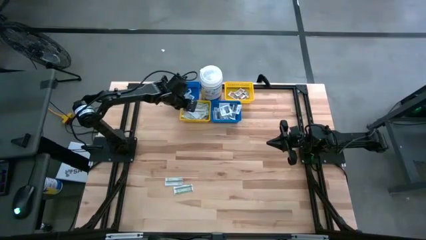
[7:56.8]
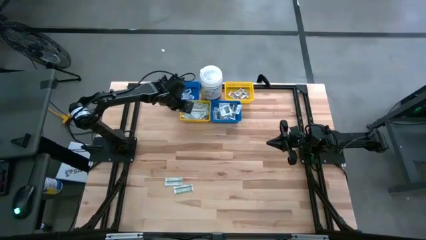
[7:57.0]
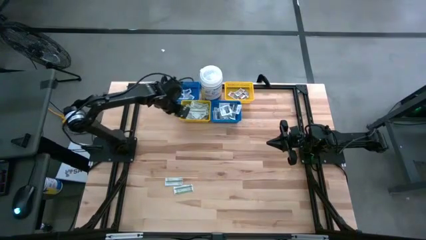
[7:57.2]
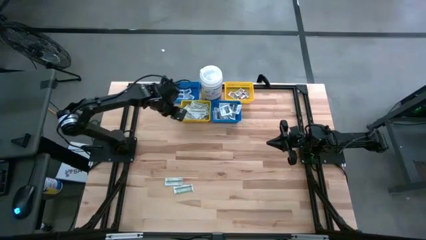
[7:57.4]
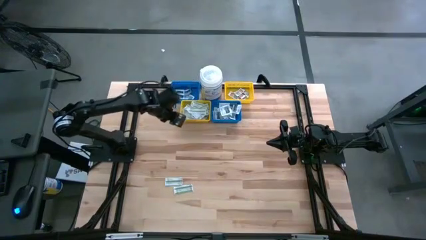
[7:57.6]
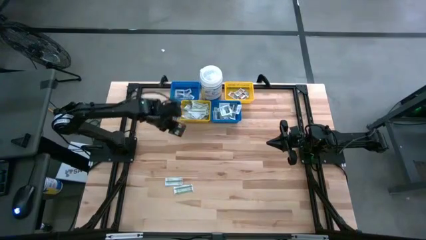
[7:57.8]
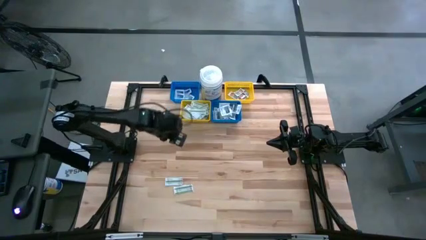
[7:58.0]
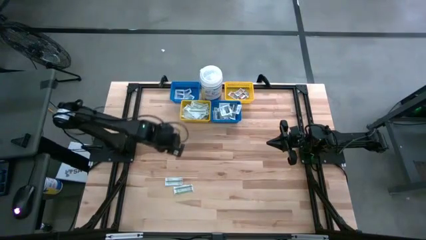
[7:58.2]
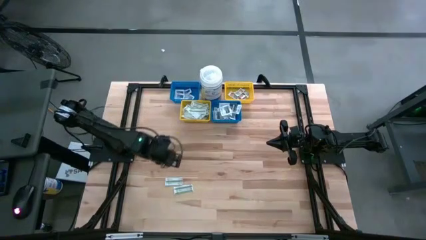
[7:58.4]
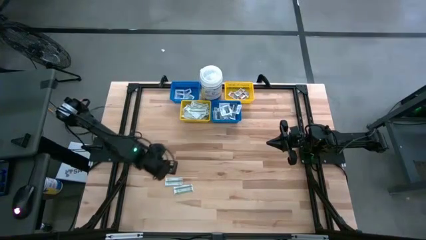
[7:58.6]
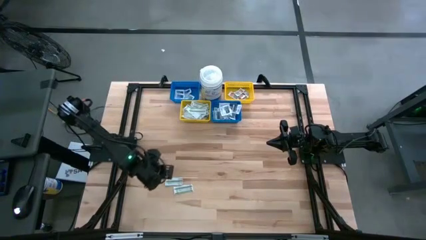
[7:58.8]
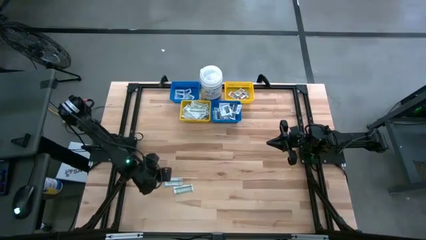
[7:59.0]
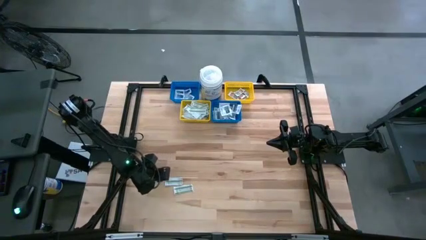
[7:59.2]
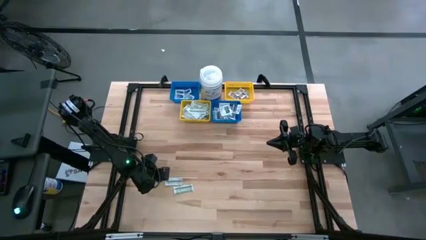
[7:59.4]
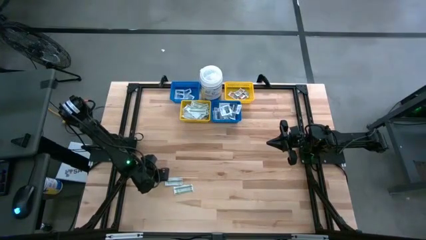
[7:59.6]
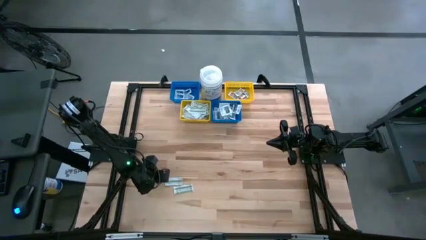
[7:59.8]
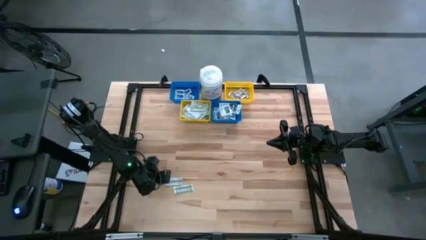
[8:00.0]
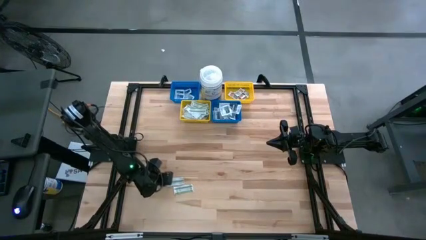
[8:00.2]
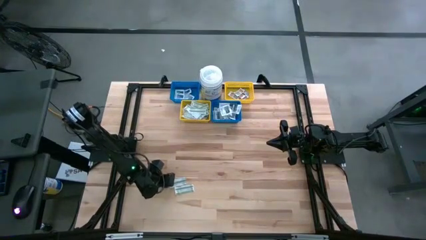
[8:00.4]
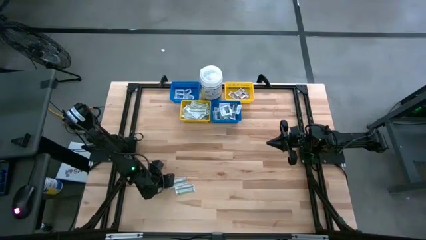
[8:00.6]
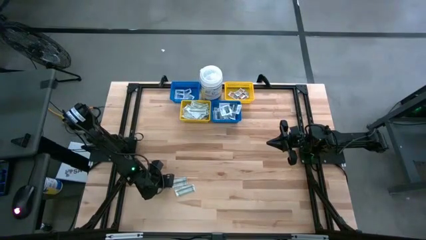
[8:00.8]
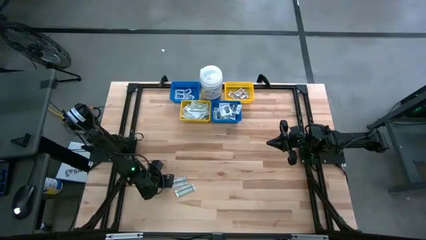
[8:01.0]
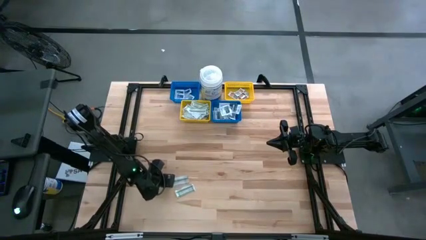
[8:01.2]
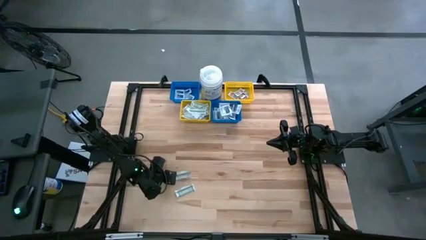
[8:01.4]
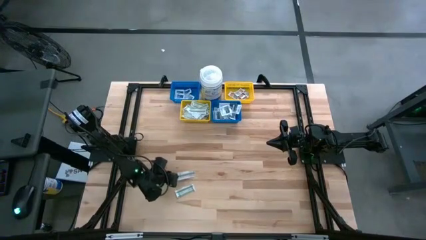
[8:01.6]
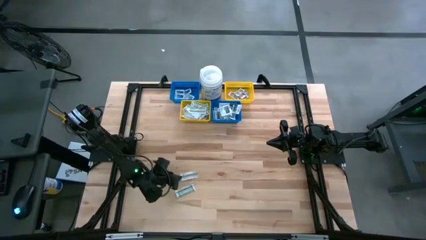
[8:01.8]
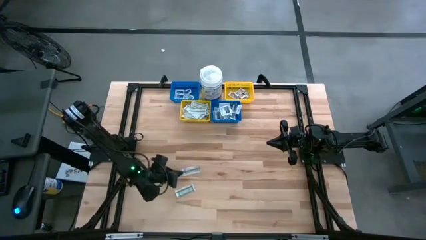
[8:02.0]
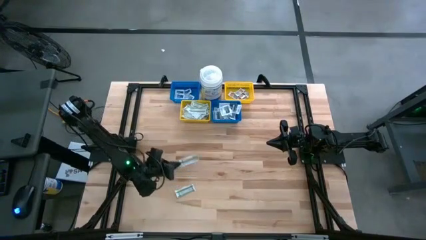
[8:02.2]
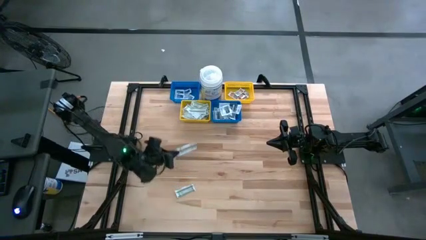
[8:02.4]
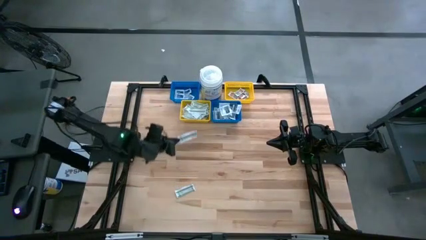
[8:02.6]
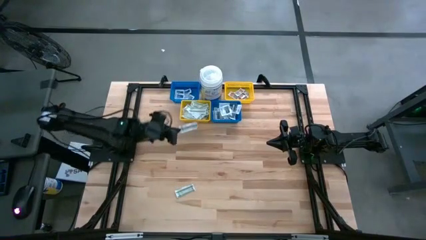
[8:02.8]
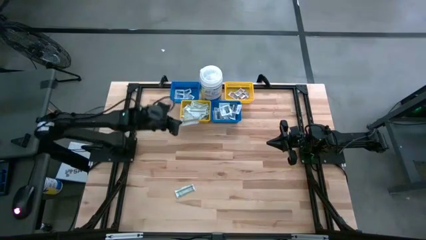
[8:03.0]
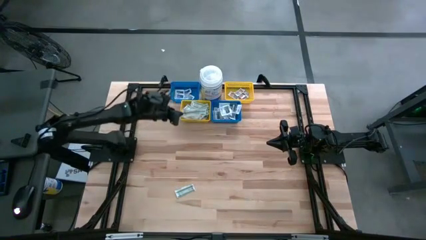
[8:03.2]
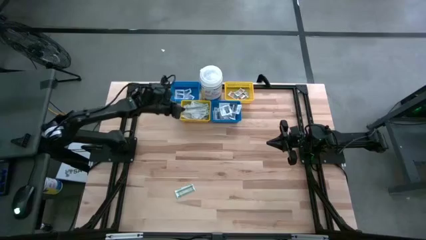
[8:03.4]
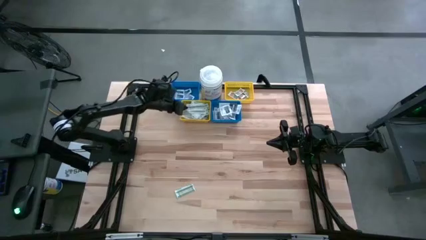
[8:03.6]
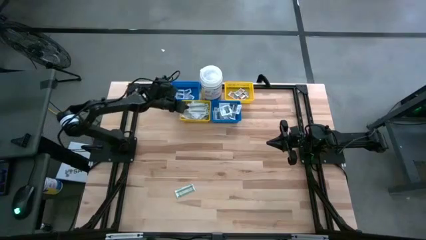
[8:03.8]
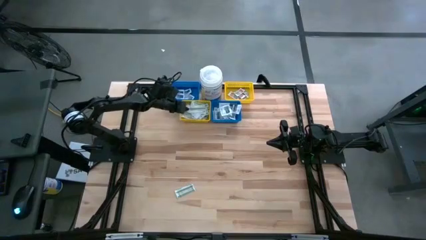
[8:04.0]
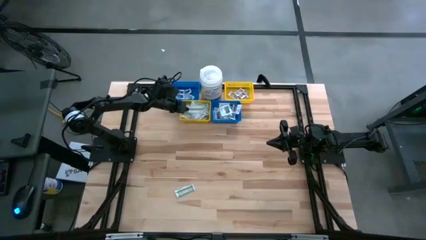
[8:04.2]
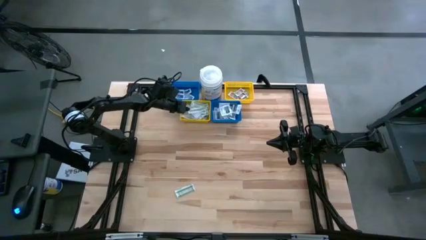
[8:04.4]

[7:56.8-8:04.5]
Task: Pick & Place First Aid Supplies
Put the green bandage pad into the left yellow bin

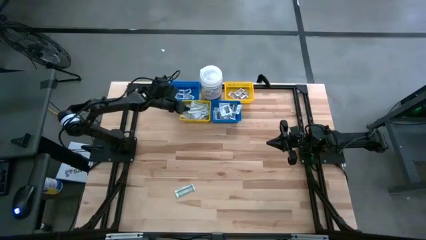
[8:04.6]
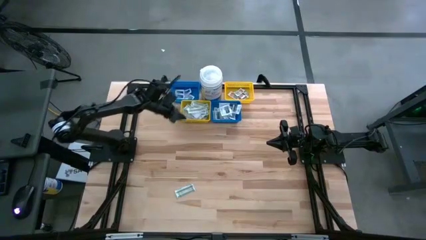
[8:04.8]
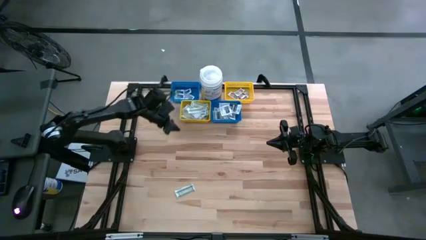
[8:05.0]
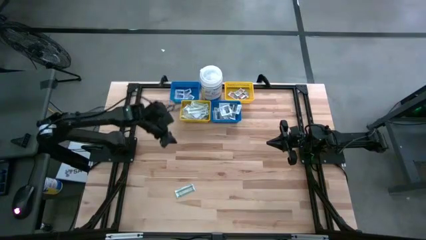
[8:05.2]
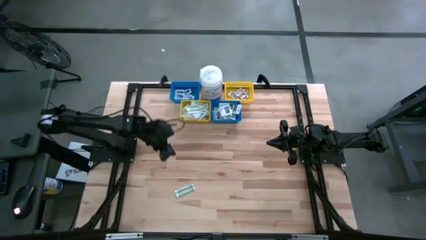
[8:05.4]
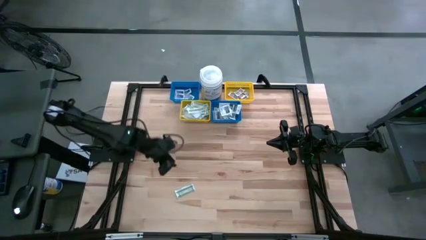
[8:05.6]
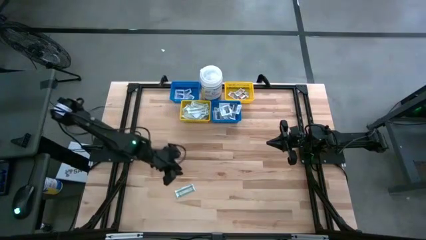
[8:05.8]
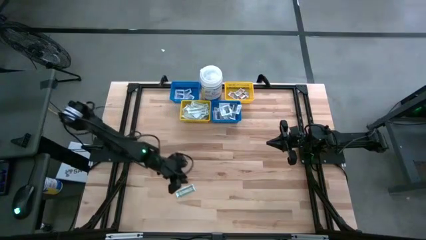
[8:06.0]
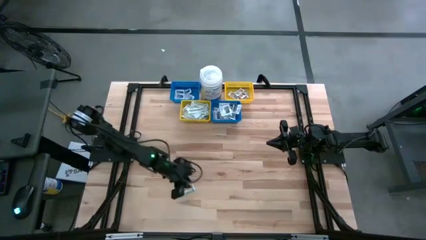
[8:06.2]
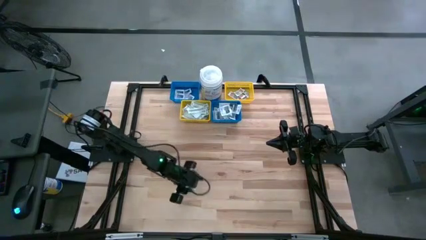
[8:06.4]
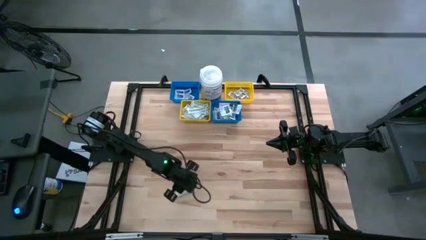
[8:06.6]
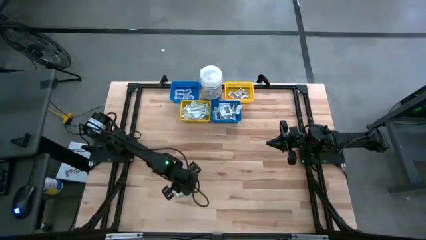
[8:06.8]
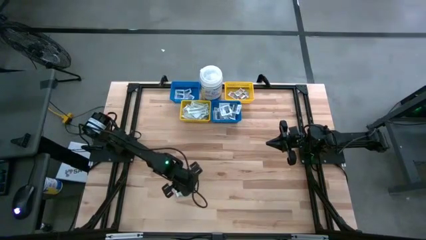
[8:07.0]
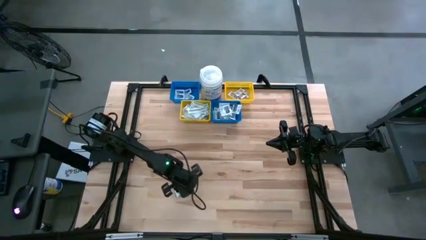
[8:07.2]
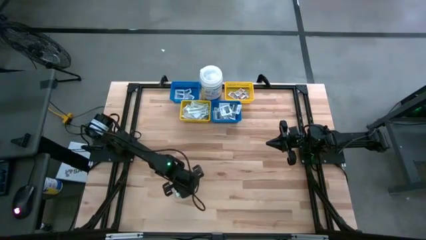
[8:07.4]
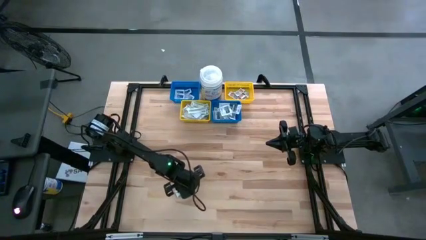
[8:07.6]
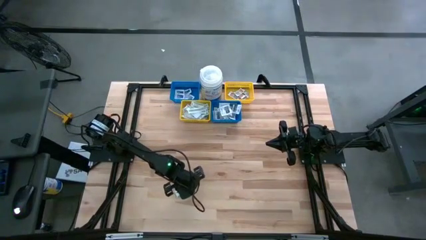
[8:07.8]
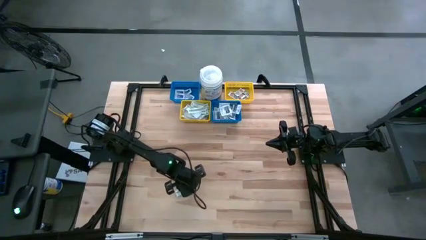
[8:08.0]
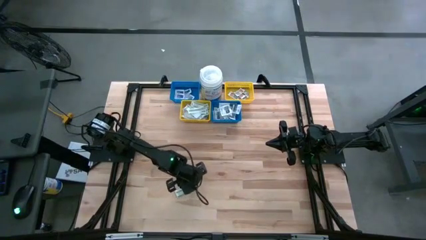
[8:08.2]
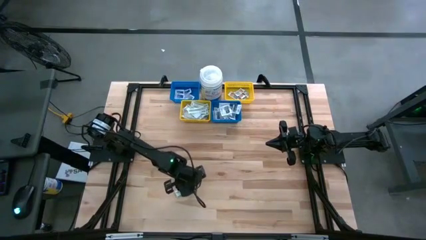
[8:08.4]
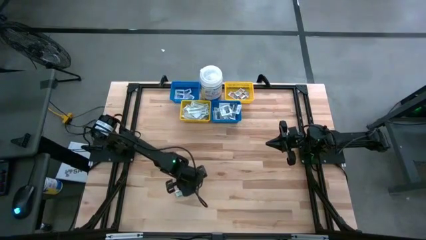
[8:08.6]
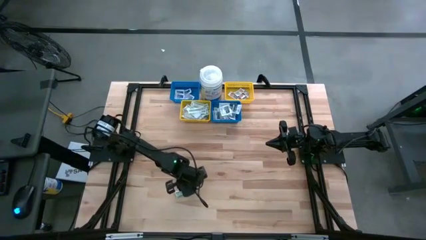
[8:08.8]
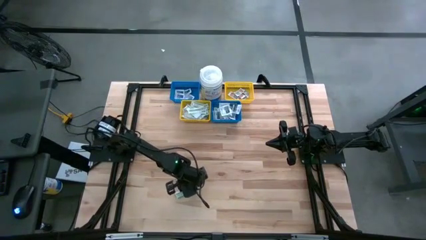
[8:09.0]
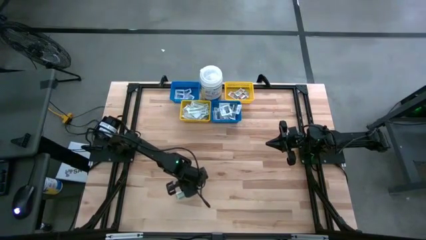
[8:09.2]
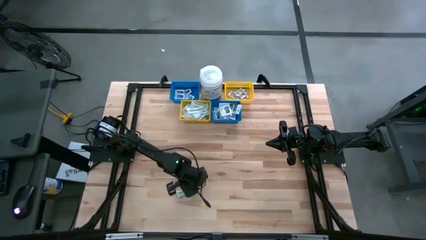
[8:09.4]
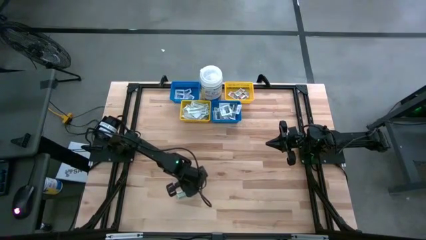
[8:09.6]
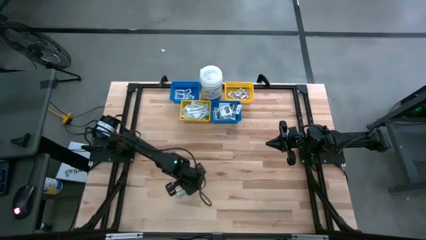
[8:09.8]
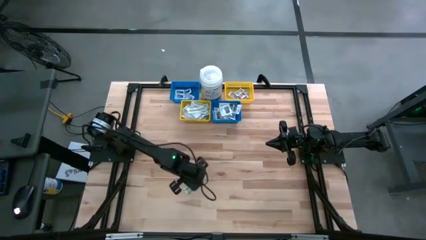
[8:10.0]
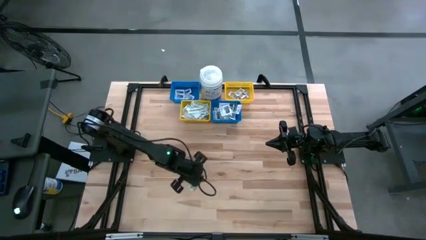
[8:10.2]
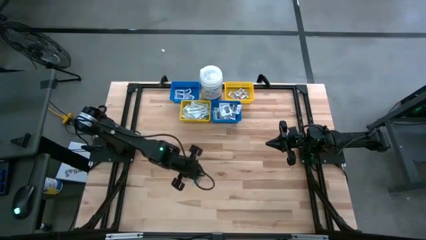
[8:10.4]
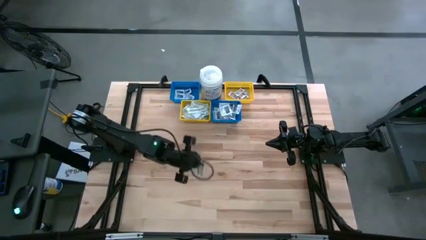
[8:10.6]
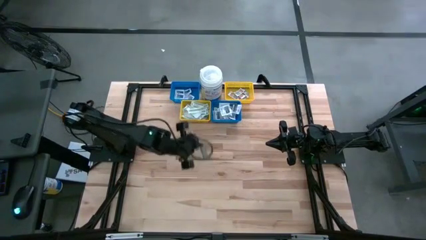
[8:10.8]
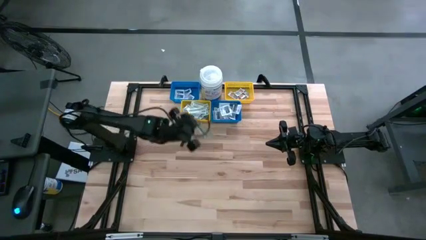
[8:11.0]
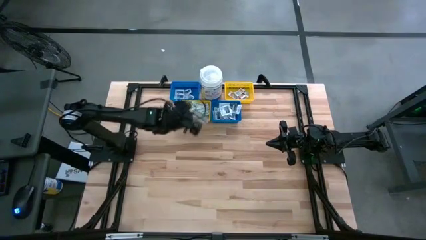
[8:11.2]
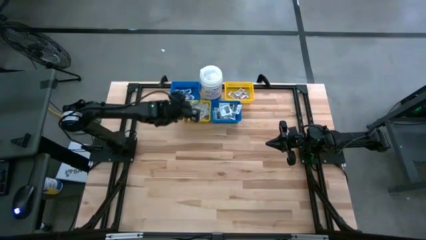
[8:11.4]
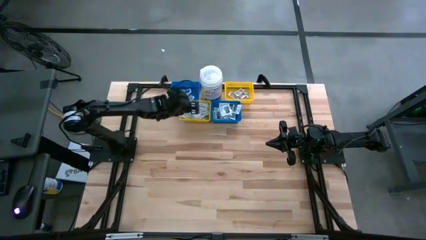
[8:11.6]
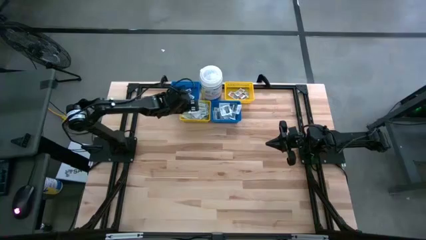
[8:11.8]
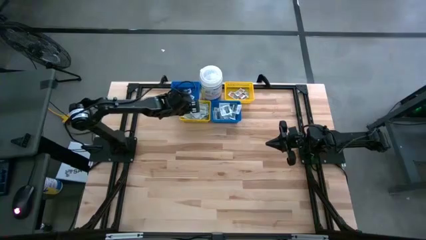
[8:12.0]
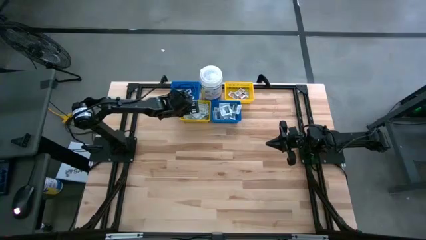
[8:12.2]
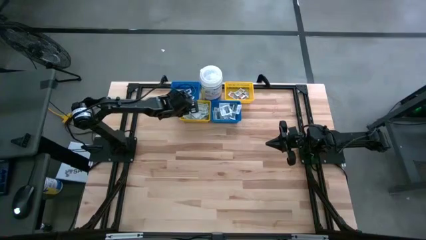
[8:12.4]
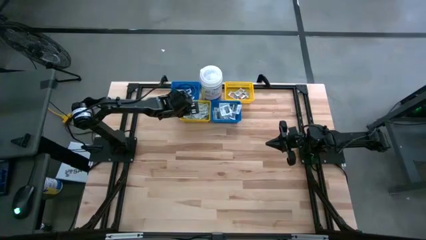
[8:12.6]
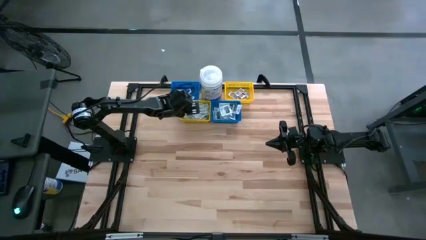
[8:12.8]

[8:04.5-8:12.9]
Put the green bandage pad into the left yellow bin

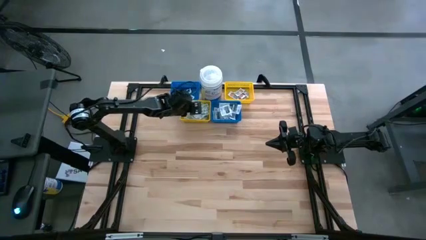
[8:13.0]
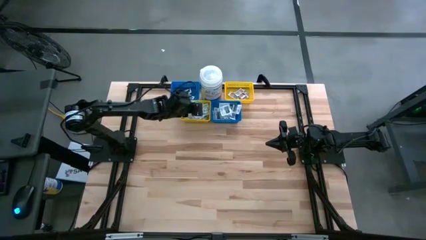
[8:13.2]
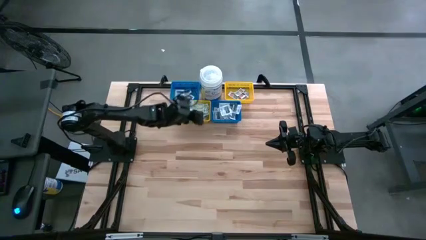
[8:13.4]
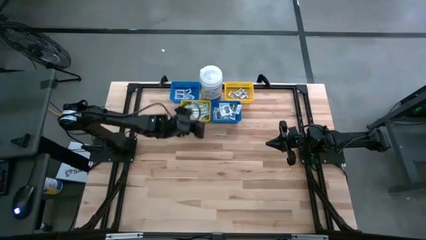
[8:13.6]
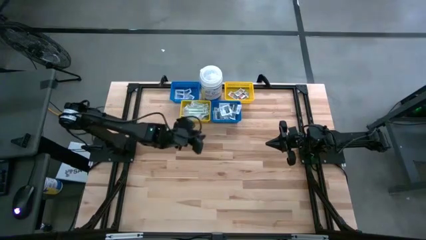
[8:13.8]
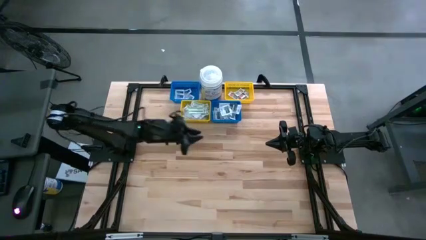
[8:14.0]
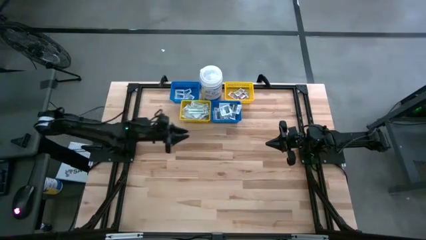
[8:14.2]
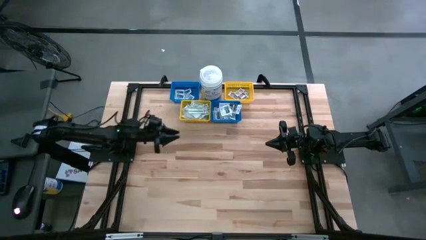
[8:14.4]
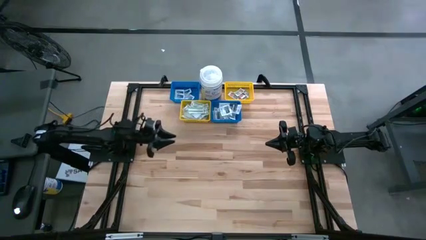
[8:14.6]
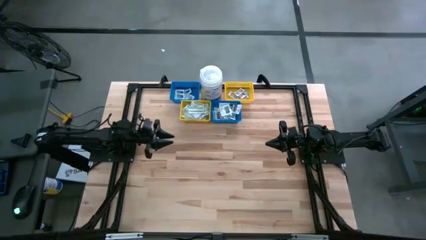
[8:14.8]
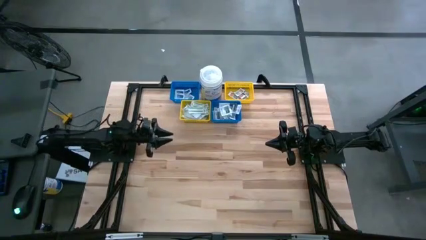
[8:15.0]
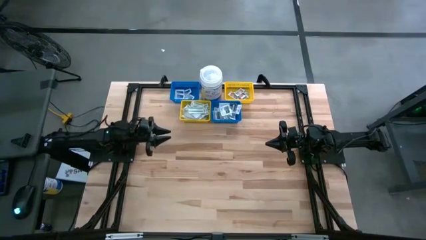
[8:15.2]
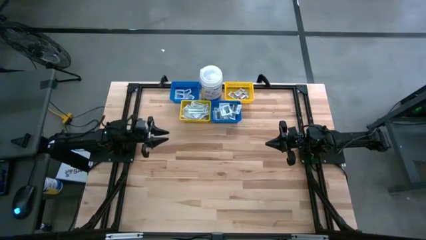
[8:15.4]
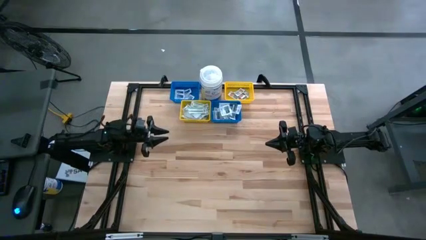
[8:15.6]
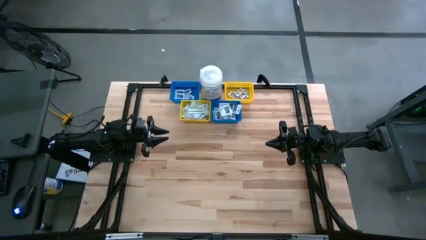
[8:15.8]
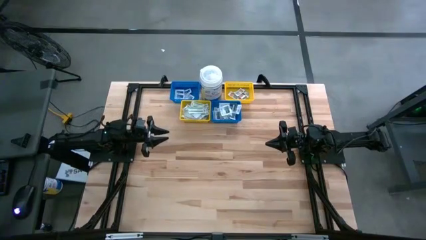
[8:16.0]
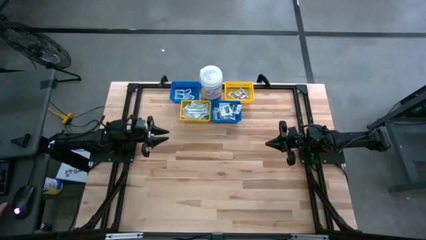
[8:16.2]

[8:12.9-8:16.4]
Return to Home Position
